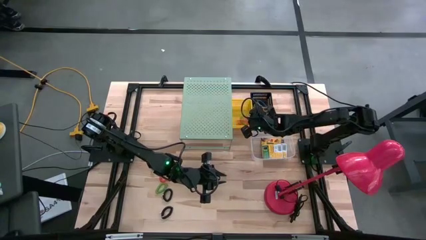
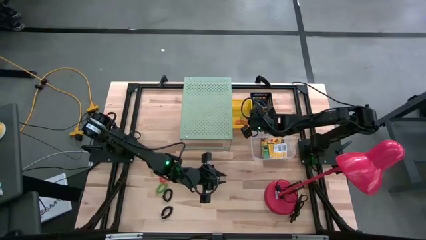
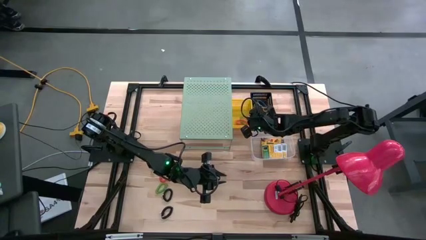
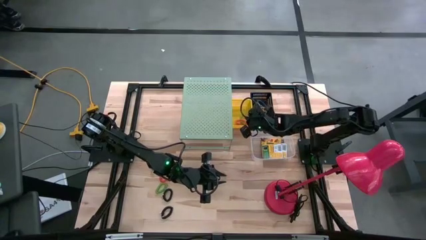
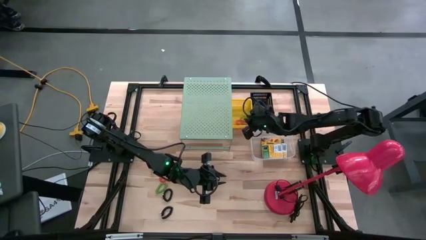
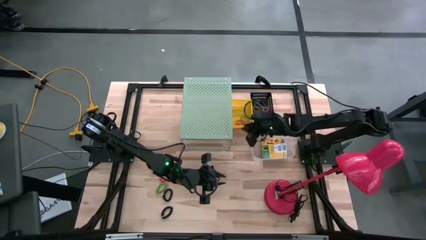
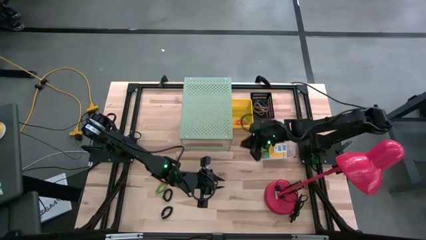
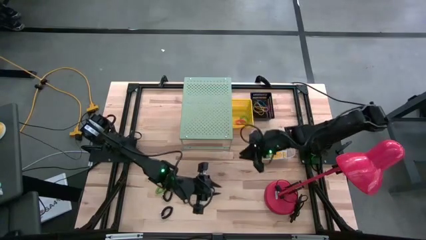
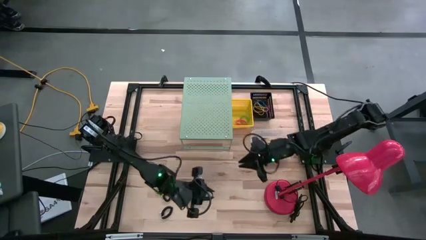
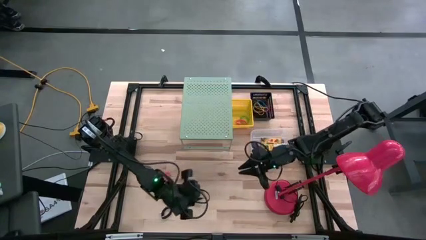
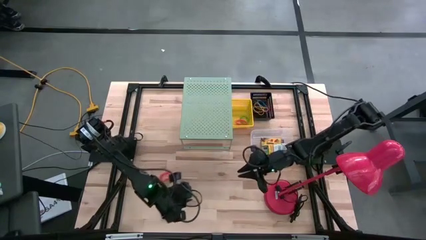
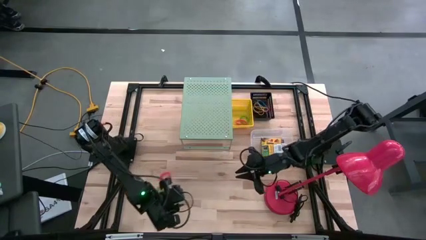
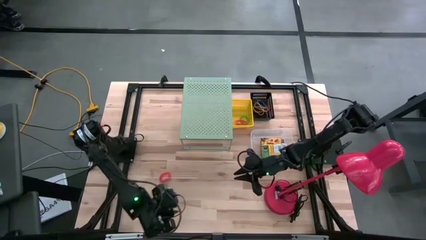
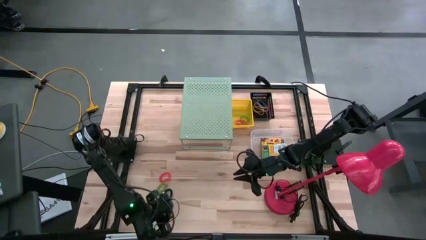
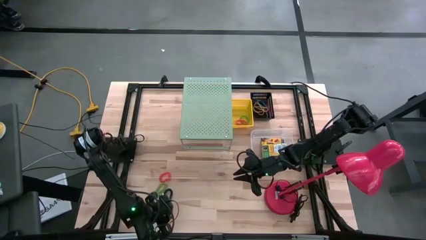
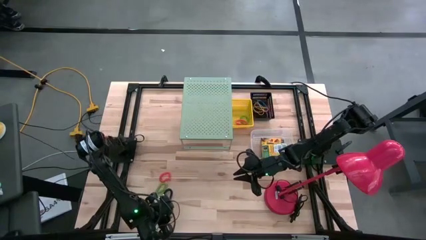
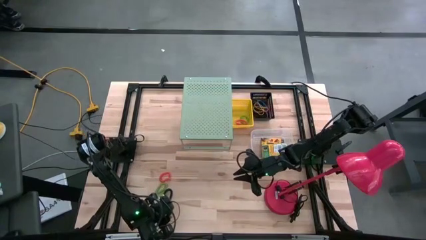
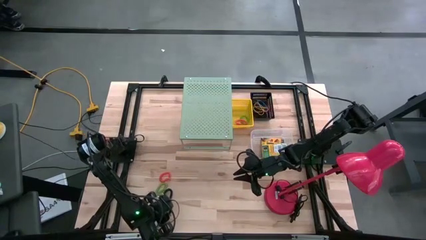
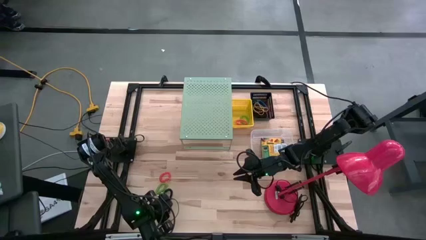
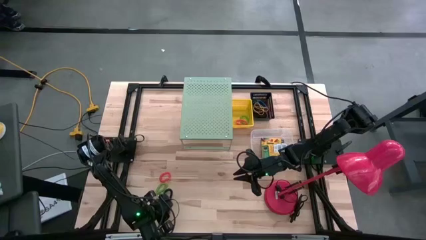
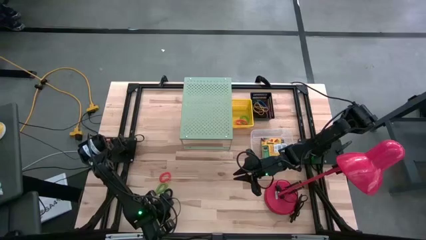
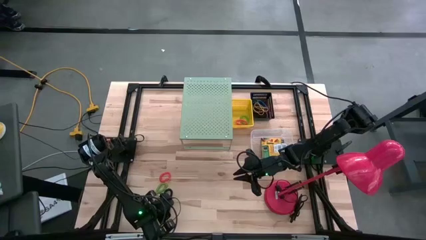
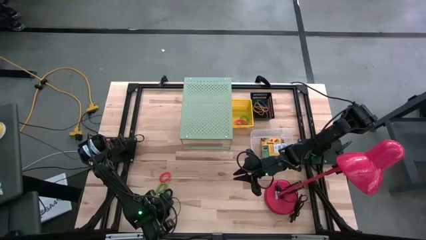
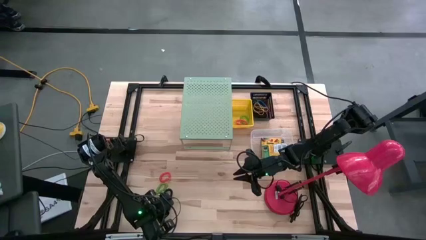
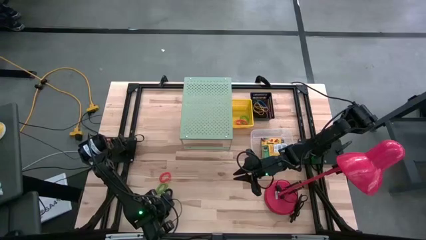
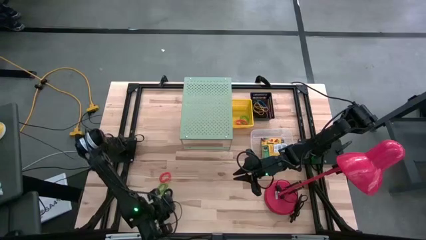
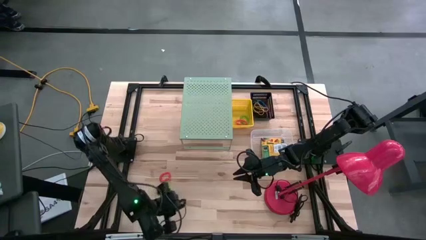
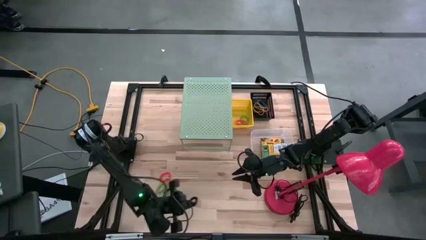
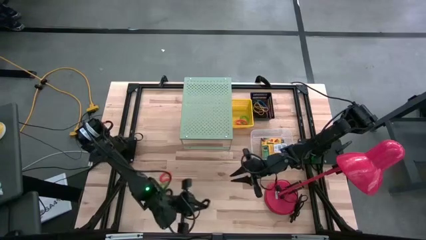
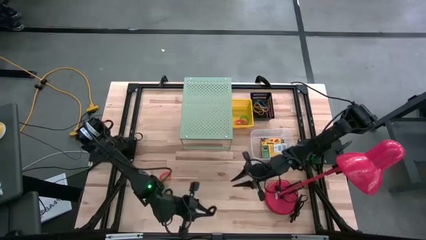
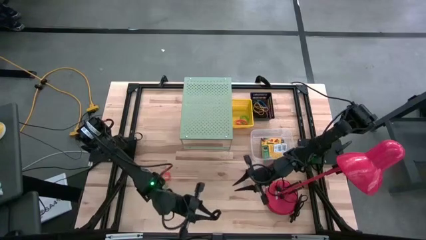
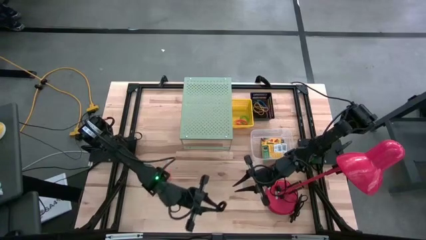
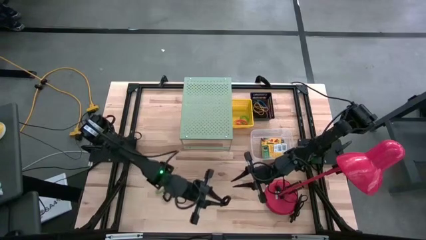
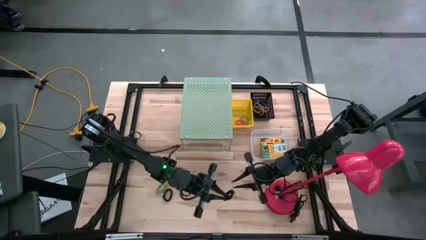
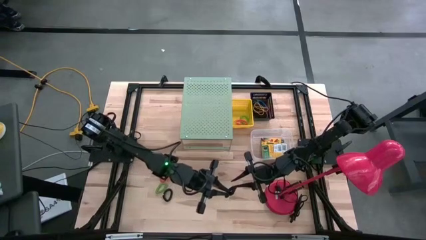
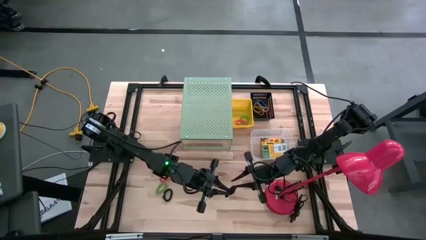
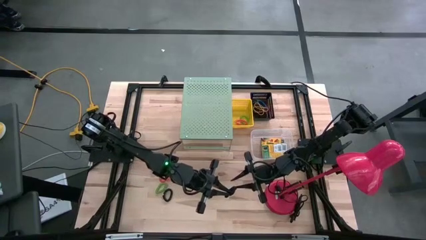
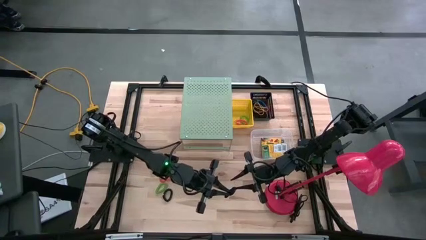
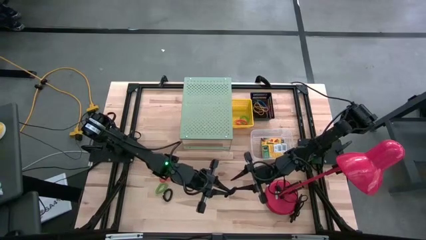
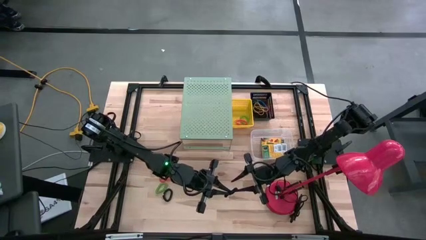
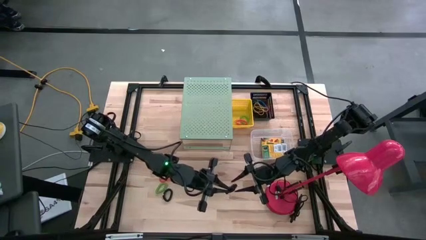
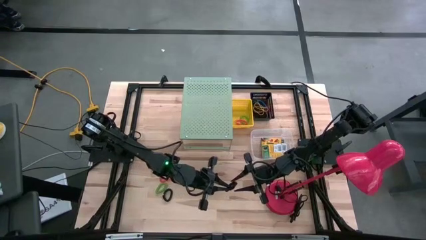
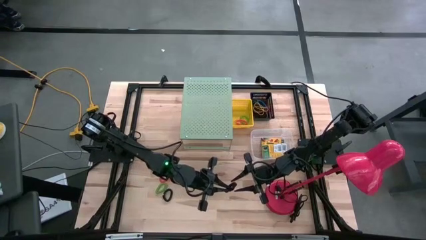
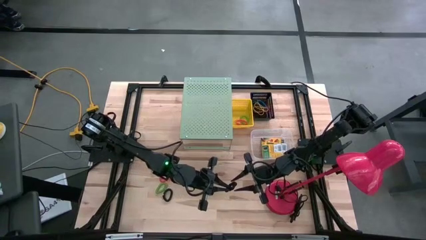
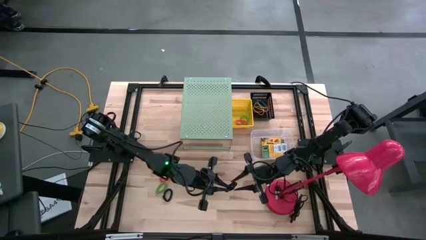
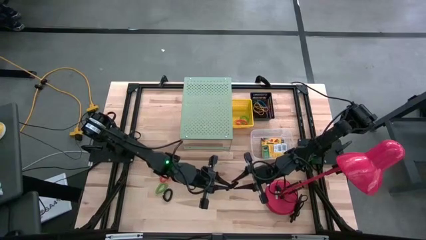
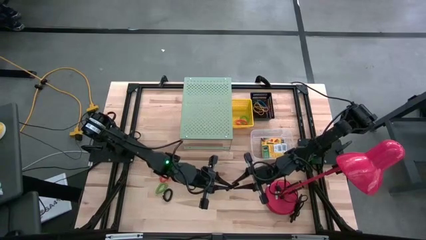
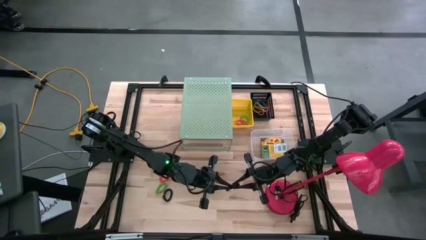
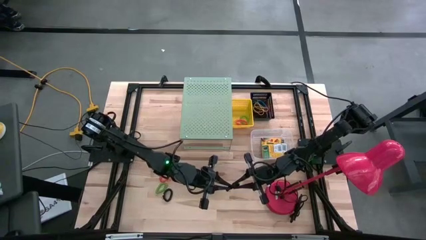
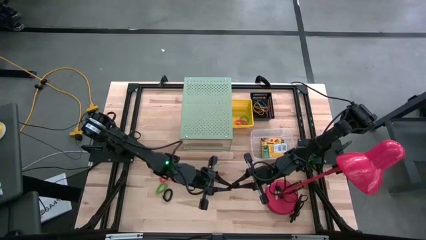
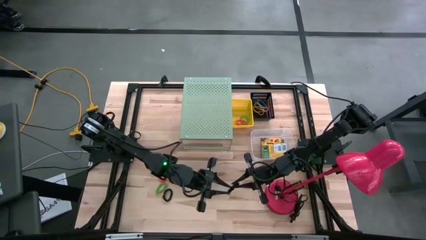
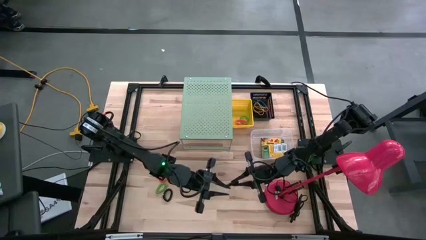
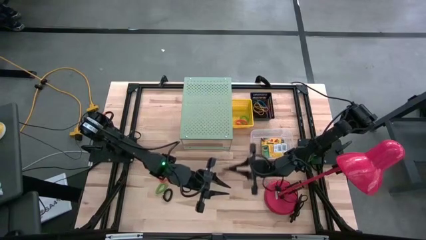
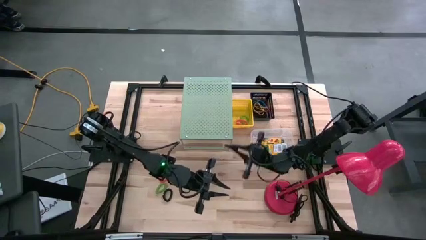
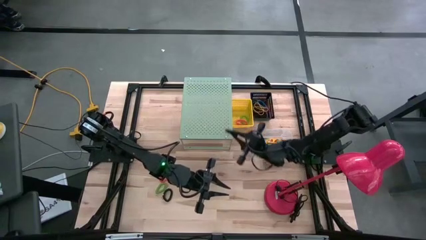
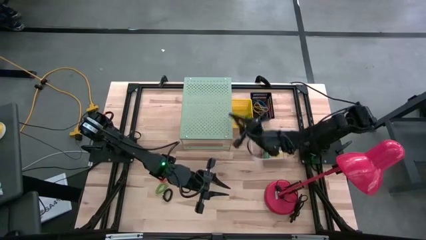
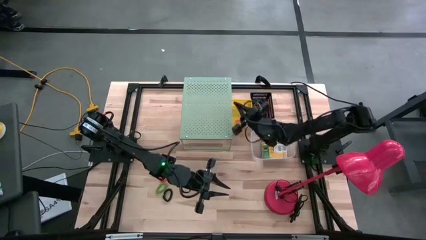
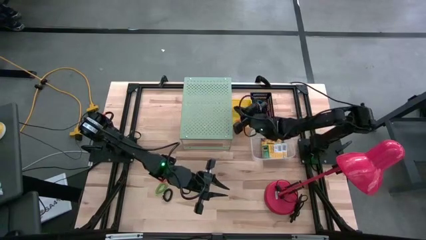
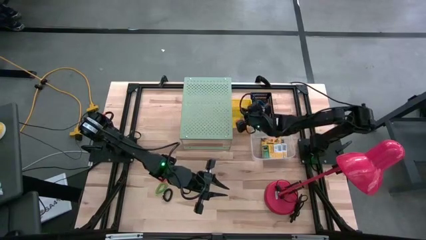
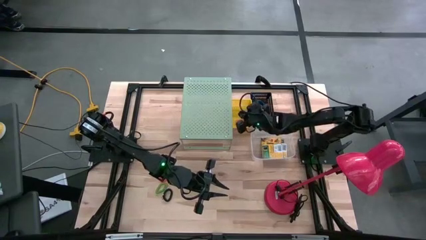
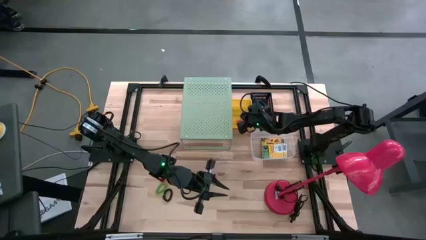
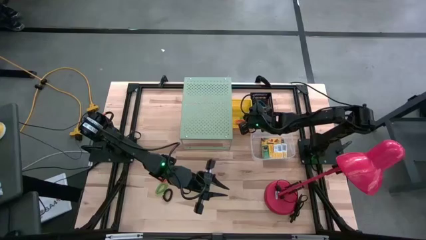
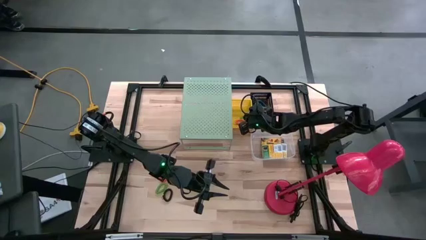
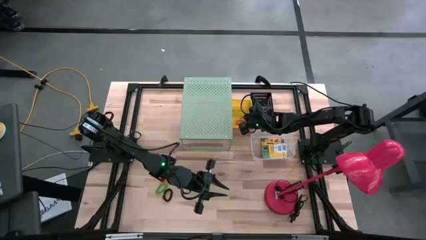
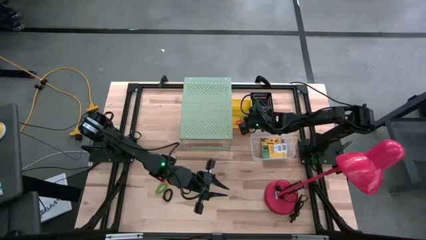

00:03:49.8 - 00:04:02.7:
Task: Pick & Place Office Desk Supplies
Put the black spring keychain into the yellow bin
